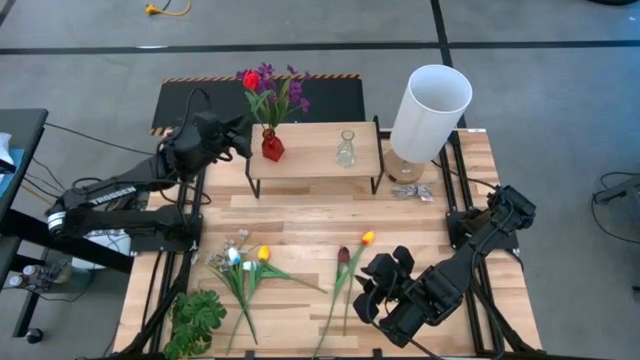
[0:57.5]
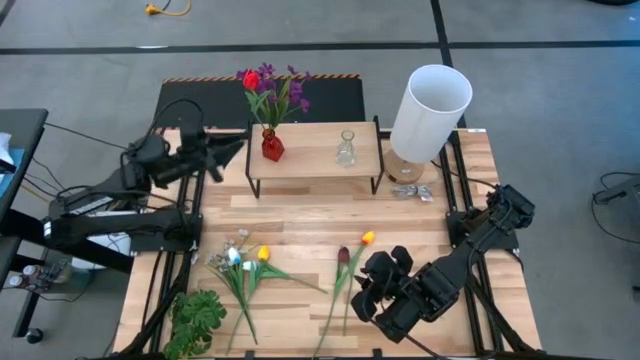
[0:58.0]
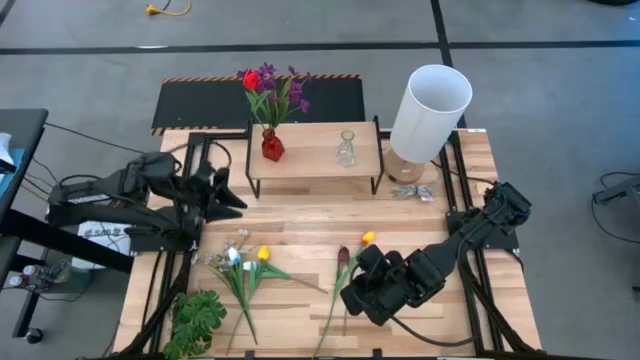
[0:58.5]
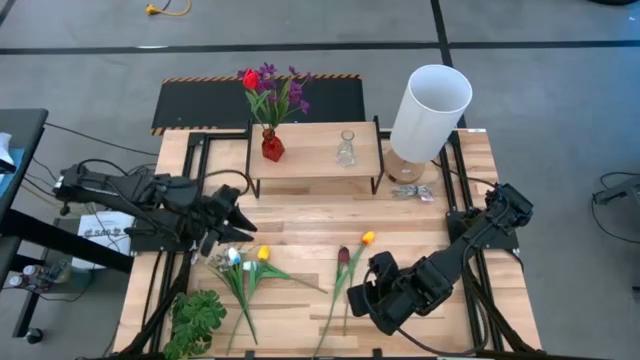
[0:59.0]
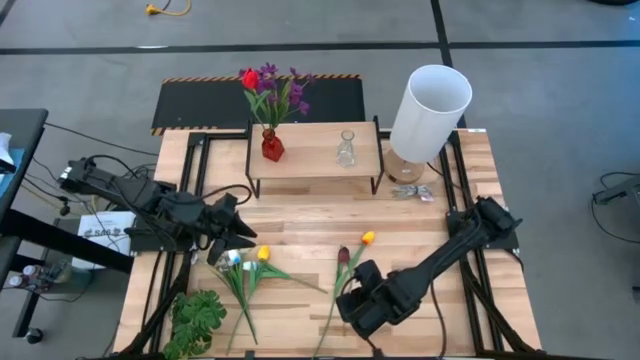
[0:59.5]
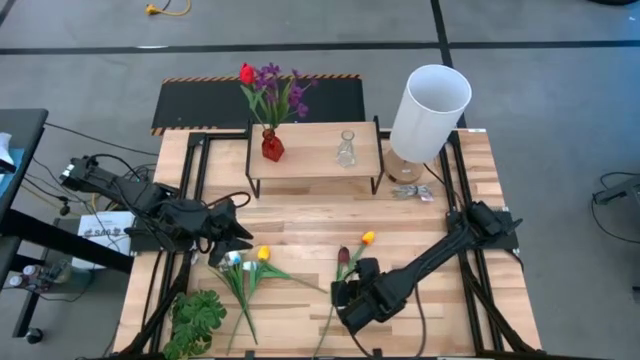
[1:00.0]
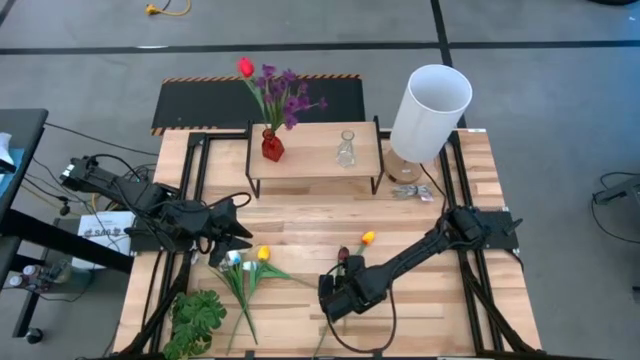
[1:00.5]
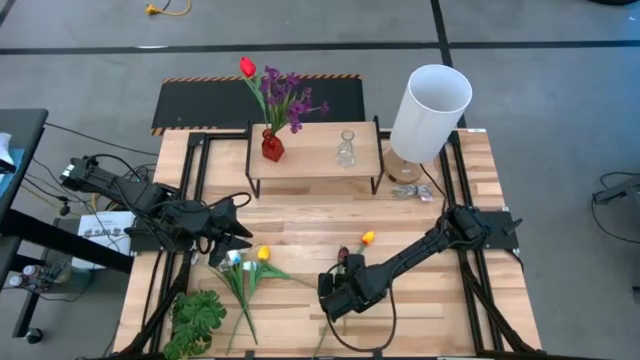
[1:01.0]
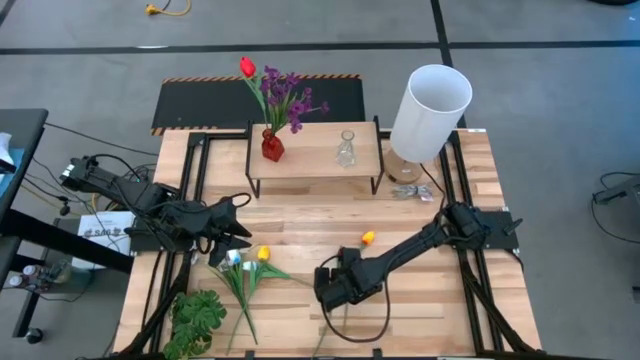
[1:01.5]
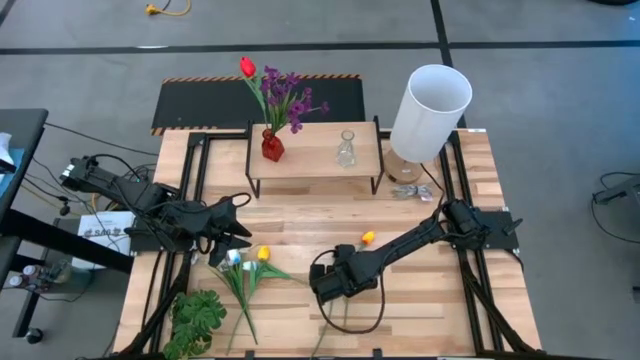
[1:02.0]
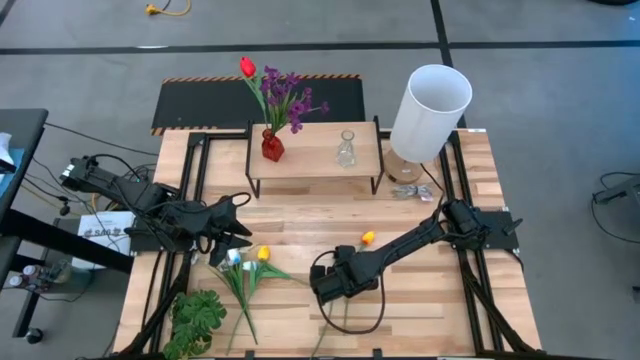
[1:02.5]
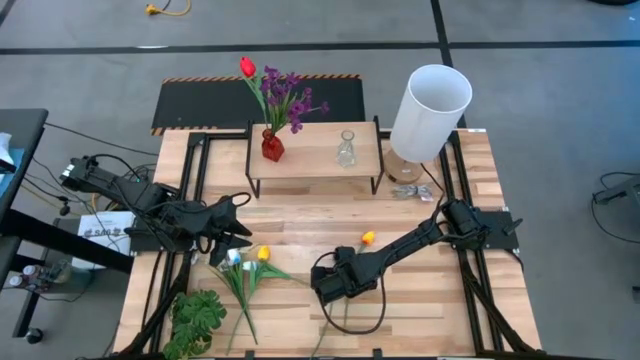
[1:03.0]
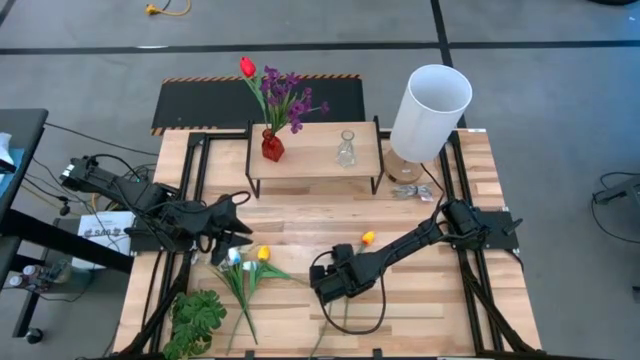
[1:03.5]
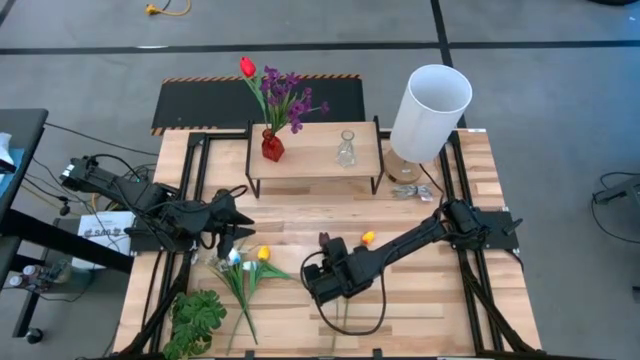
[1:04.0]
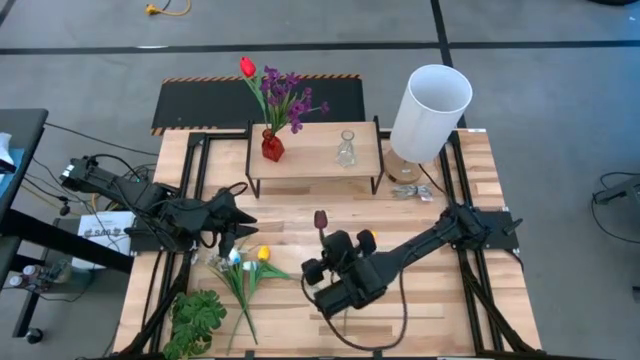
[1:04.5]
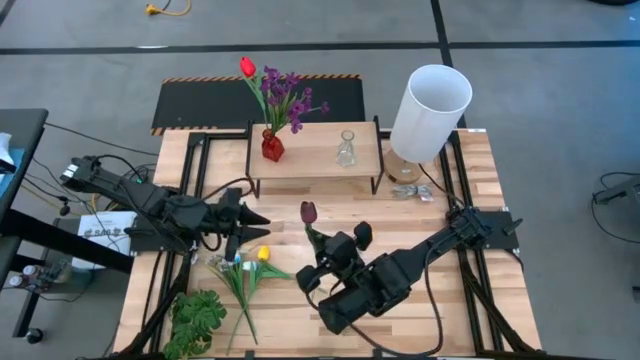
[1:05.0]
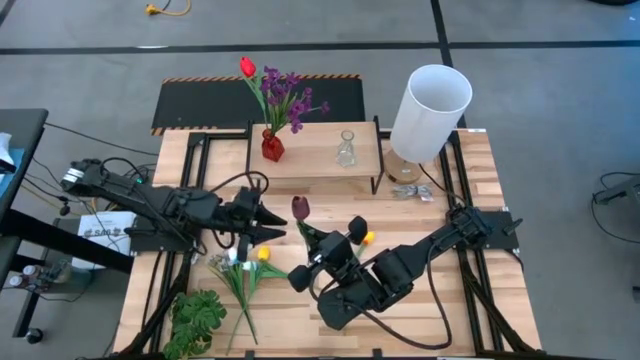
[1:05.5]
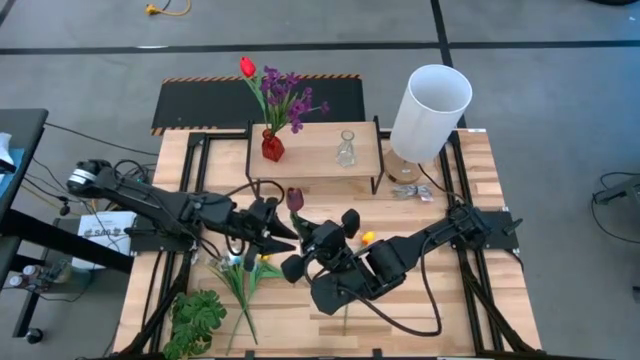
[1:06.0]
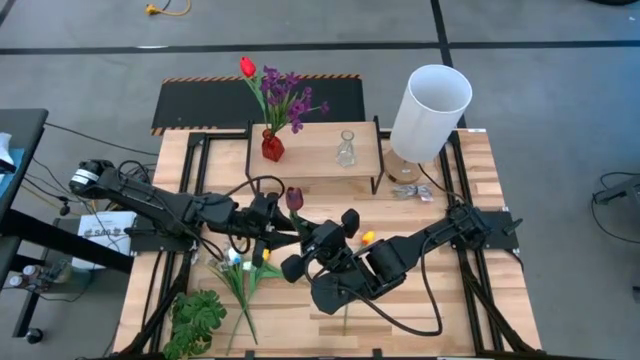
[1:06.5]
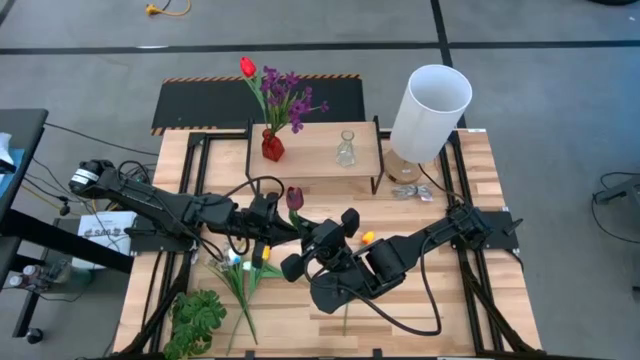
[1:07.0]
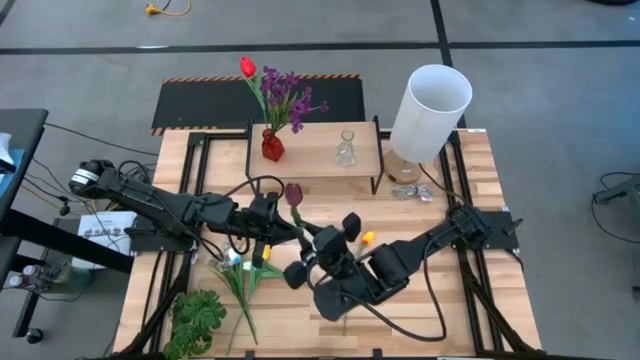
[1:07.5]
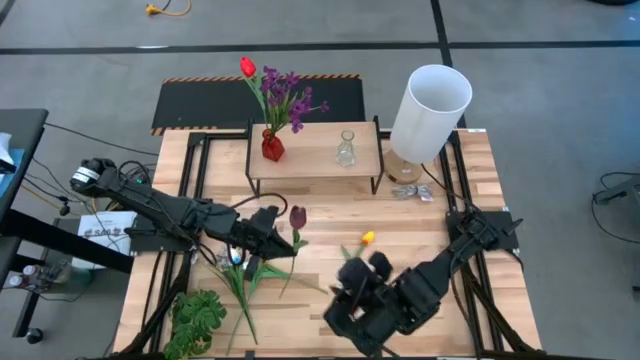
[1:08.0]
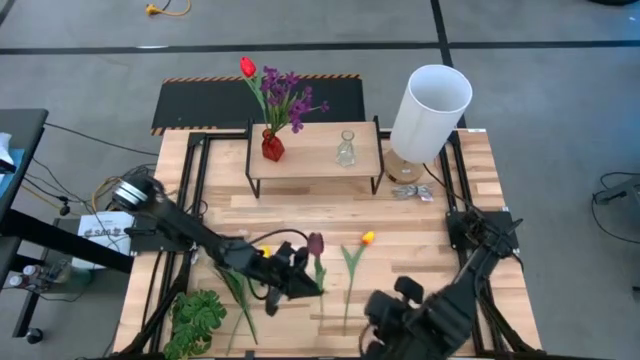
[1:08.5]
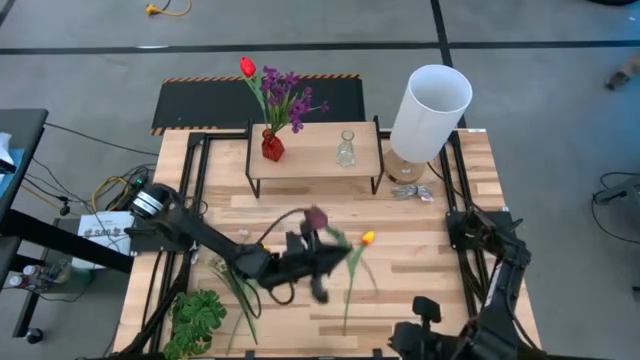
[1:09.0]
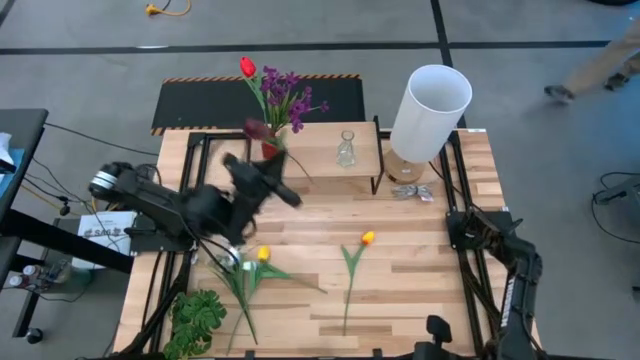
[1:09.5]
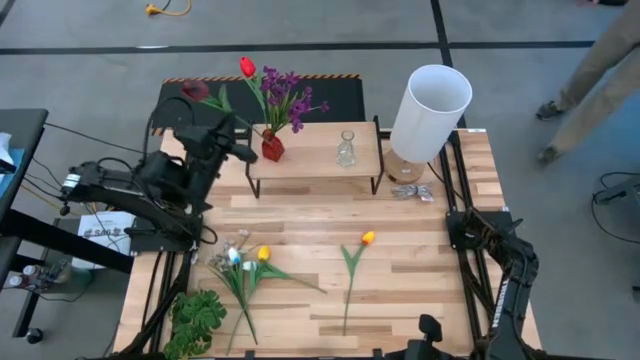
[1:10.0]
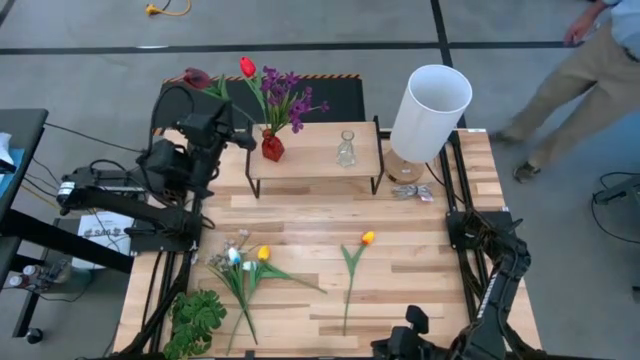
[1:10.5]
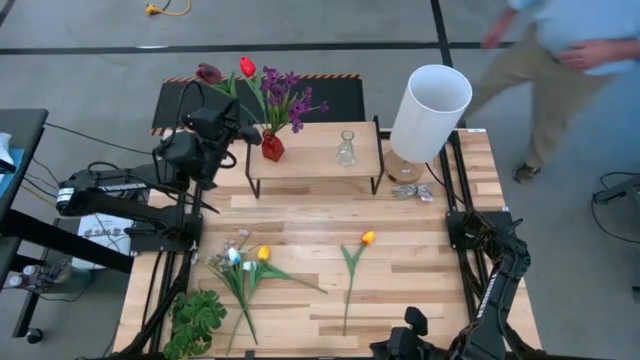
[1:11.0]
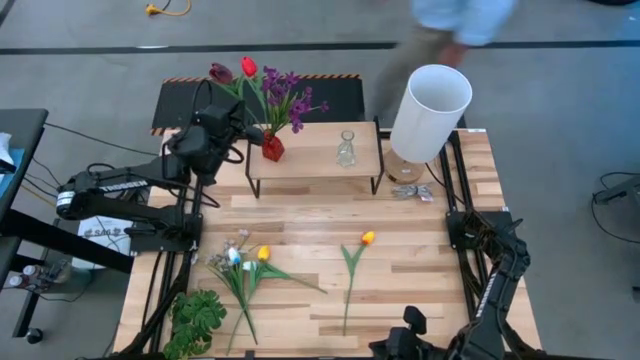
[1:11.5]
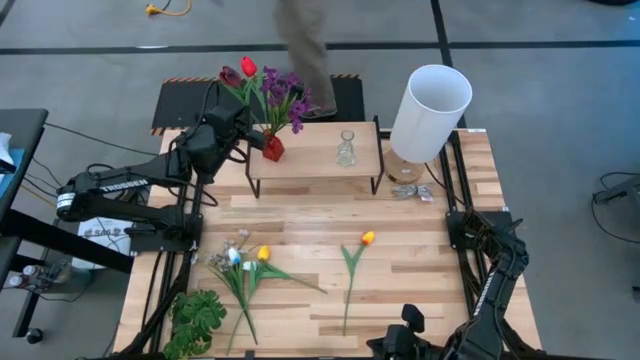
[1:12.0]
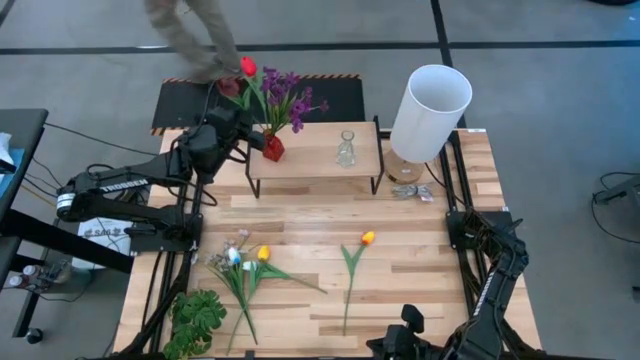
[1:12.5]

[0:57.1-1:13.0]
Task: Pick and place flowers into a vace then onto a shelf
Put the dark red flower into the red vase on the shelf
